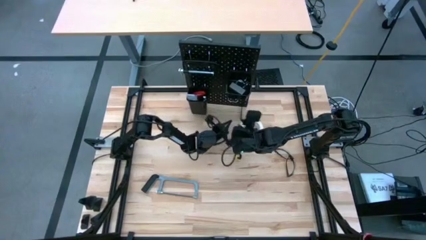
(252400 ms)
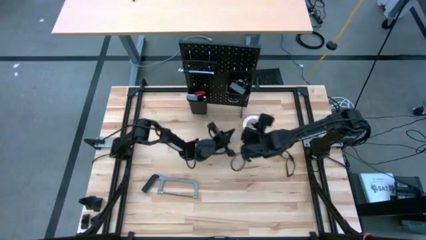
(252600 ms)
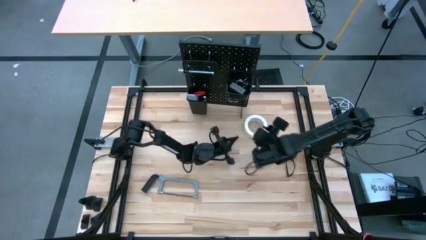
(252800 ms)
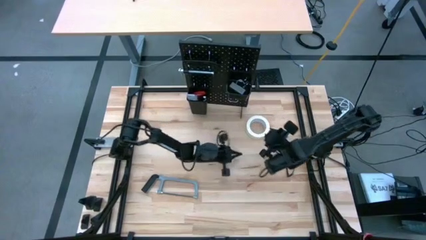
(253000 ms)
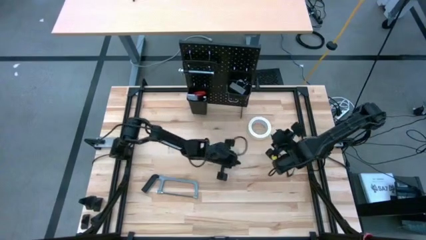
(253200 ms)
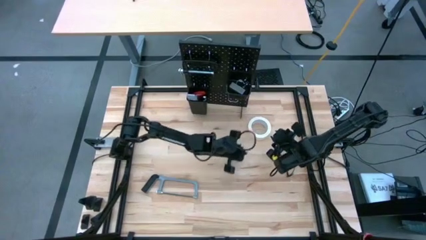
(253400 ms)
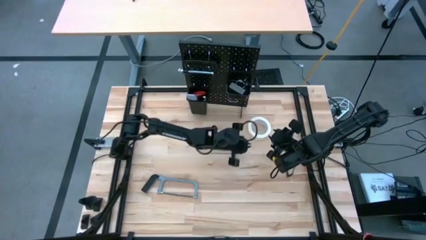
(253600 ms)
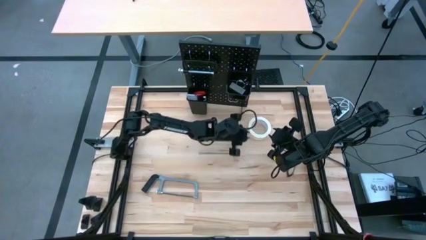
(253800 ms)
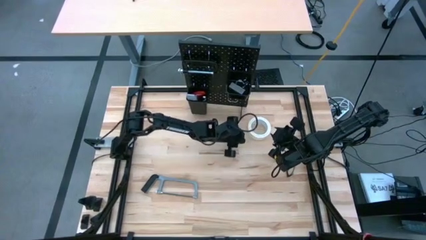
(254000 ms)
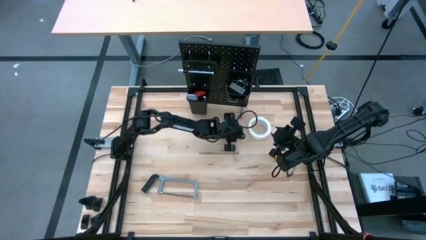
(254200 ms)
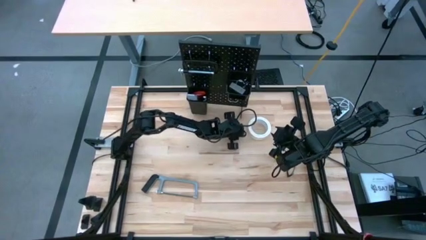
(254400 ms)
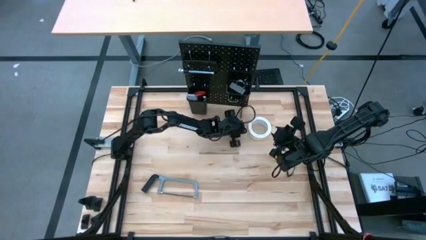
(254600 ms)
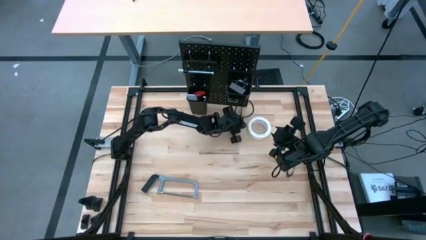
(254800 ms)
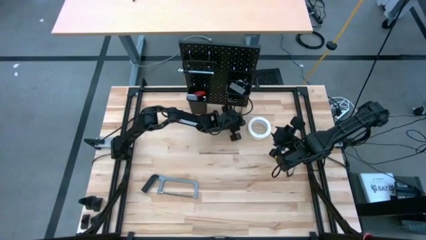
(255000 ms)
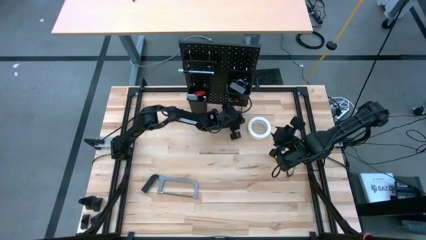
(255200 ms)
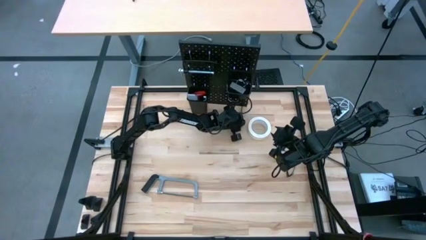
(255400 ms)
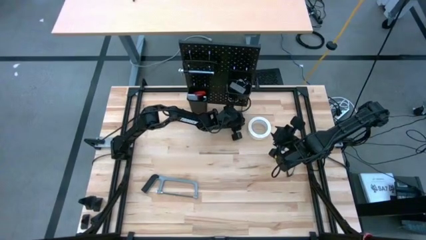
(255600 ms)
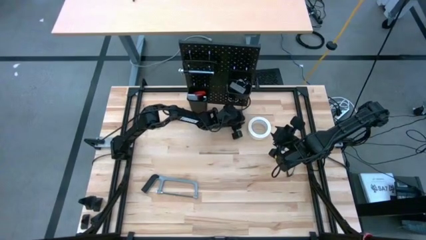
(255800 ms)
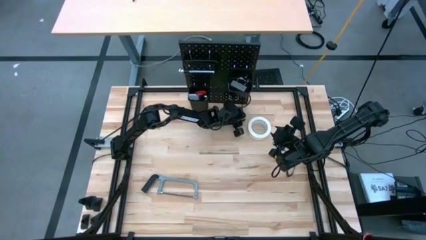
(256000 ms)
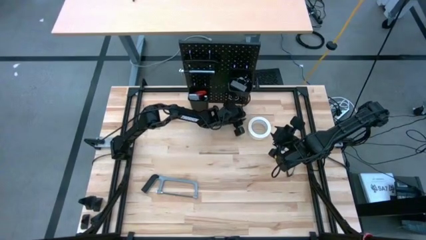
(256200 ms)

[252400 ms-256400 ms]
Task: Hang tools onto peg board
Adjust the black peg board

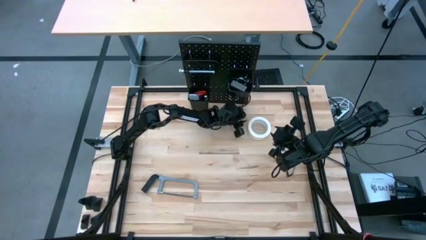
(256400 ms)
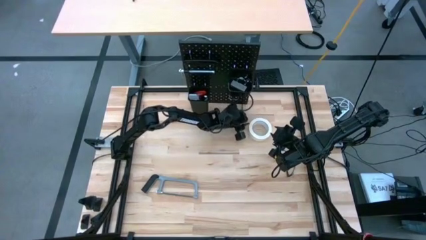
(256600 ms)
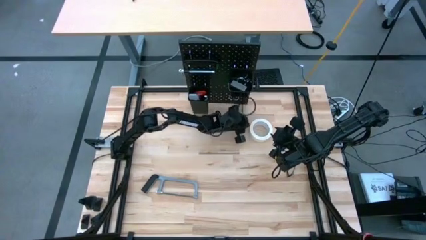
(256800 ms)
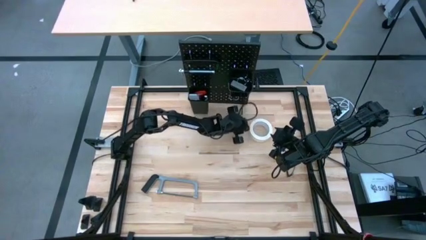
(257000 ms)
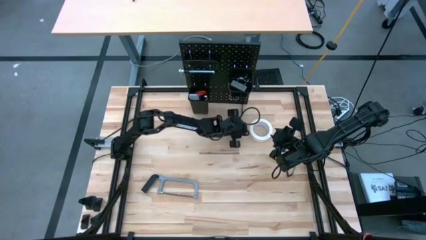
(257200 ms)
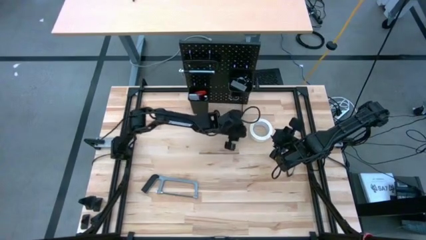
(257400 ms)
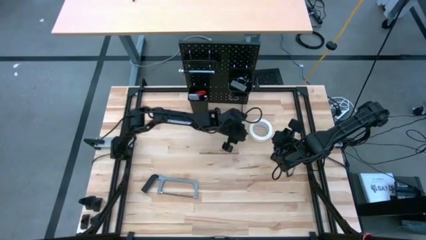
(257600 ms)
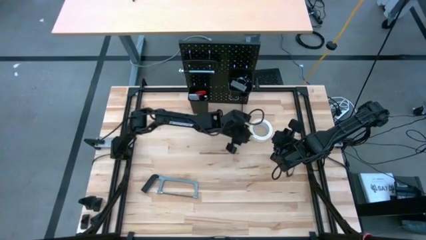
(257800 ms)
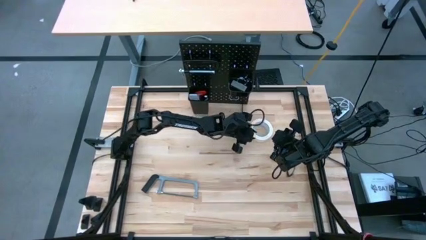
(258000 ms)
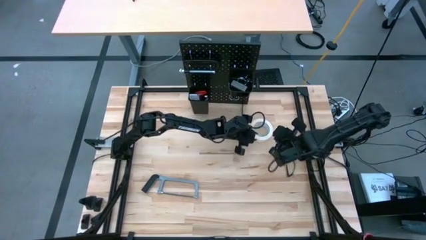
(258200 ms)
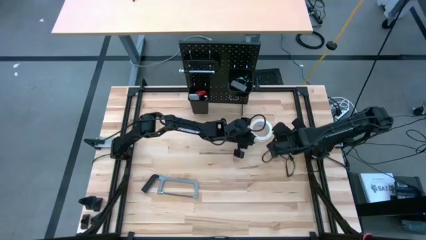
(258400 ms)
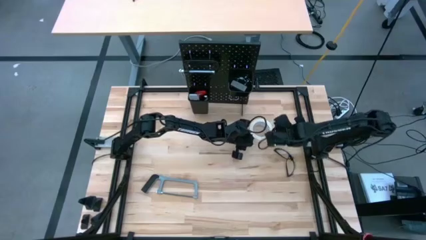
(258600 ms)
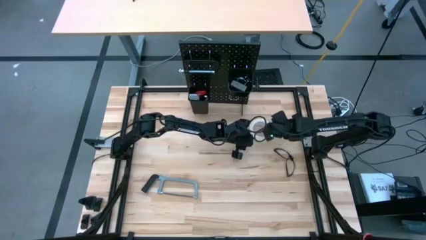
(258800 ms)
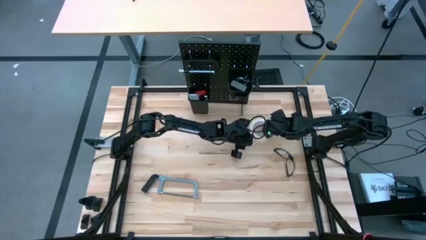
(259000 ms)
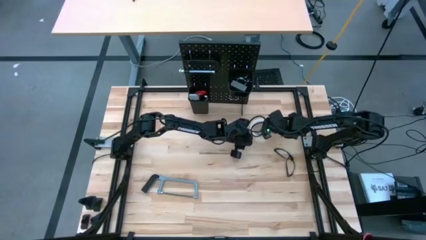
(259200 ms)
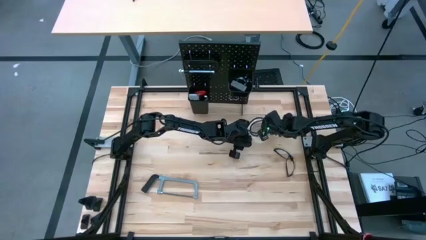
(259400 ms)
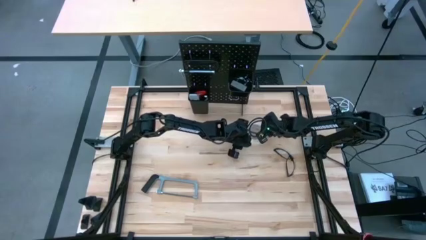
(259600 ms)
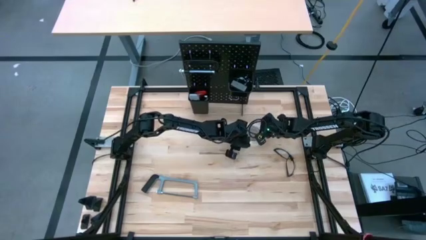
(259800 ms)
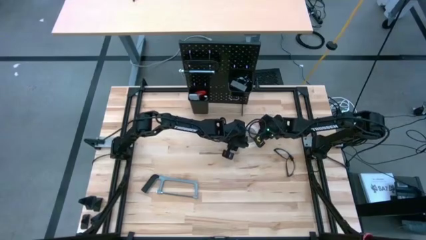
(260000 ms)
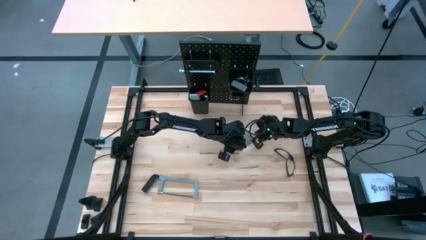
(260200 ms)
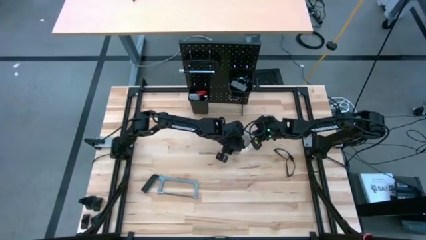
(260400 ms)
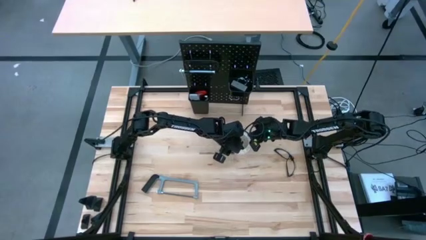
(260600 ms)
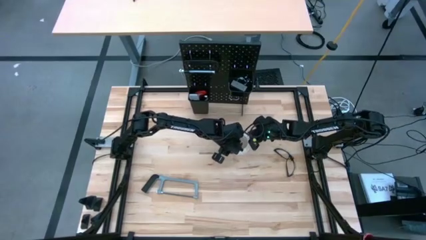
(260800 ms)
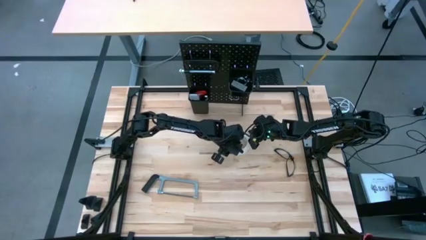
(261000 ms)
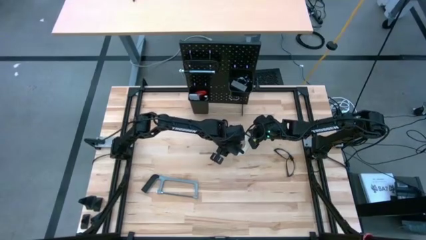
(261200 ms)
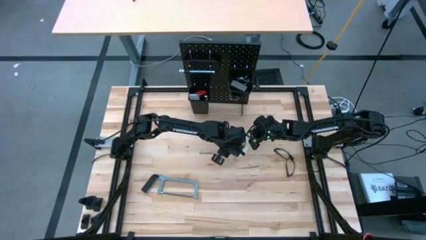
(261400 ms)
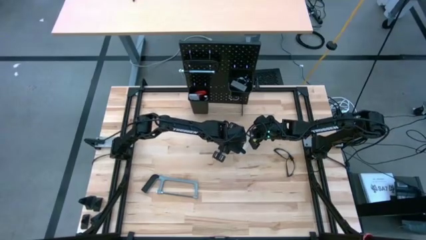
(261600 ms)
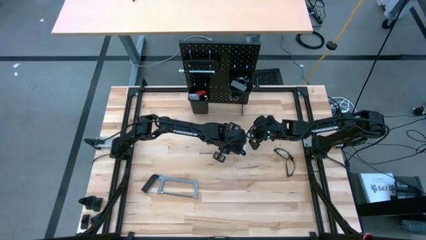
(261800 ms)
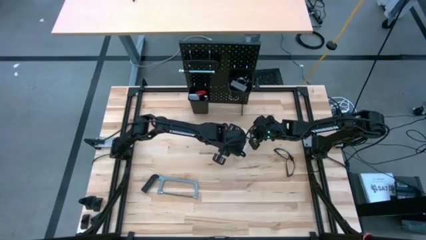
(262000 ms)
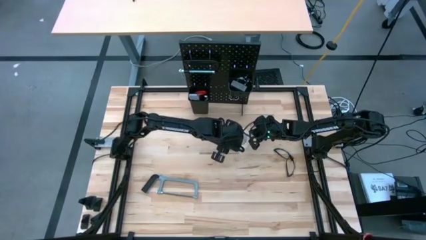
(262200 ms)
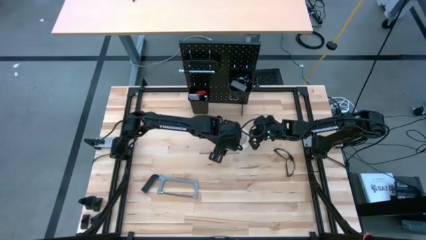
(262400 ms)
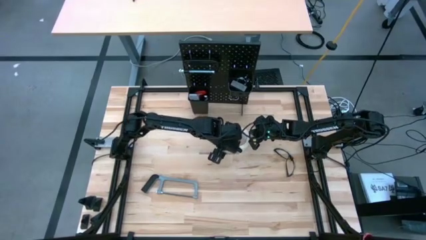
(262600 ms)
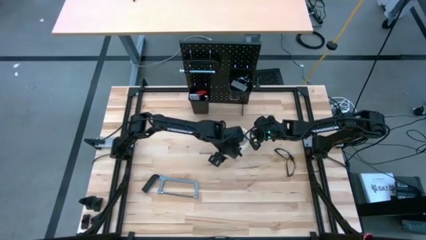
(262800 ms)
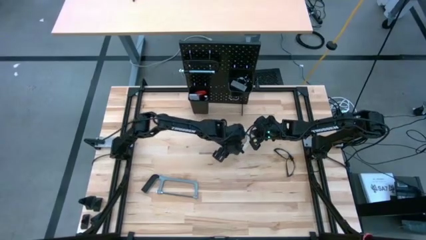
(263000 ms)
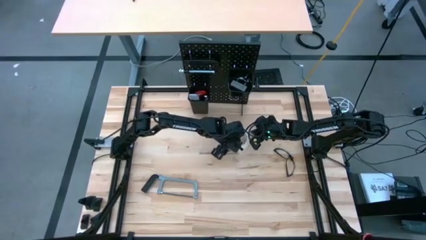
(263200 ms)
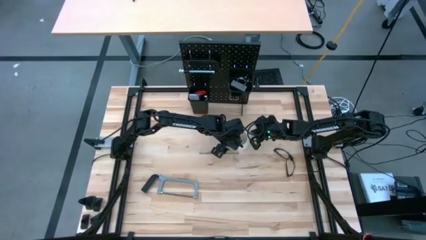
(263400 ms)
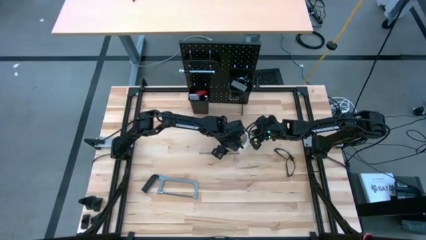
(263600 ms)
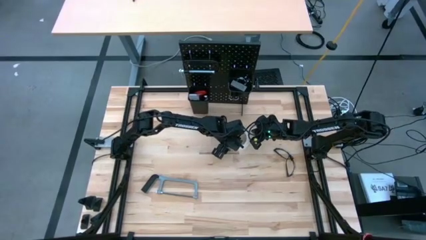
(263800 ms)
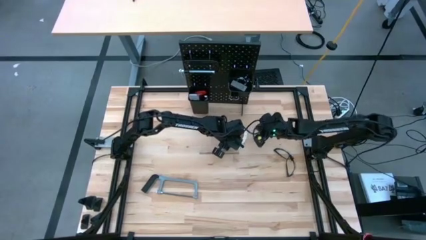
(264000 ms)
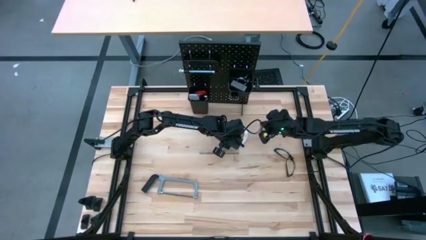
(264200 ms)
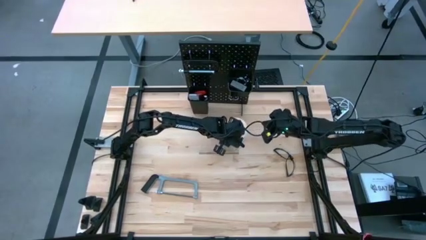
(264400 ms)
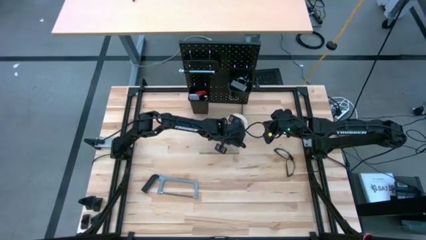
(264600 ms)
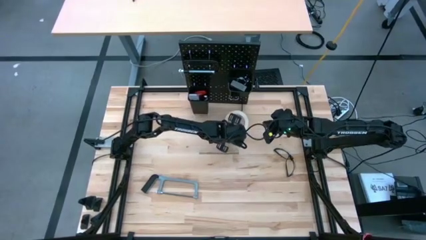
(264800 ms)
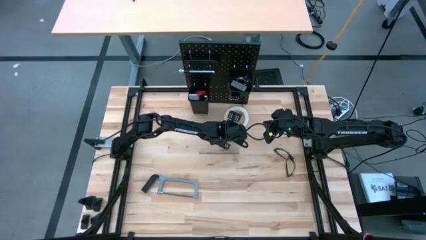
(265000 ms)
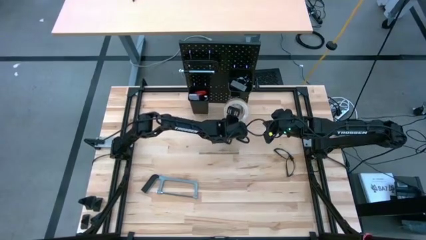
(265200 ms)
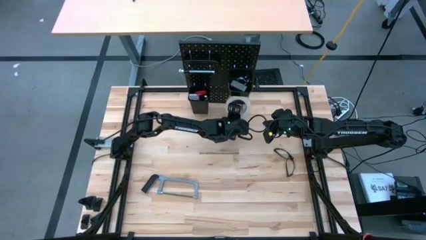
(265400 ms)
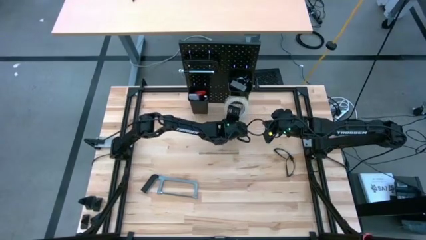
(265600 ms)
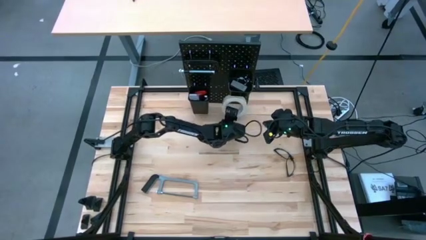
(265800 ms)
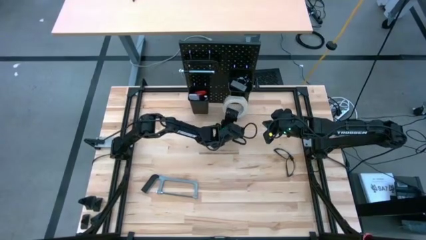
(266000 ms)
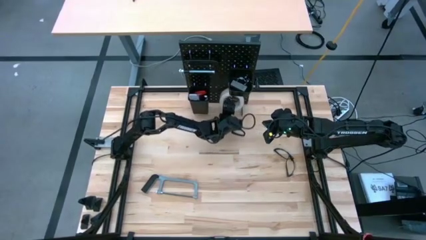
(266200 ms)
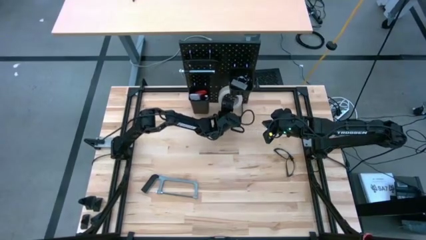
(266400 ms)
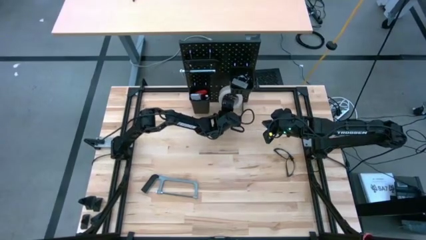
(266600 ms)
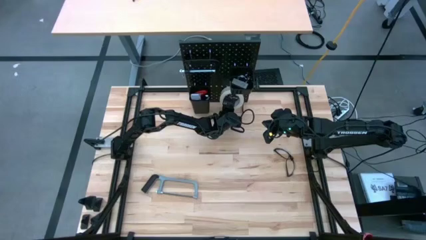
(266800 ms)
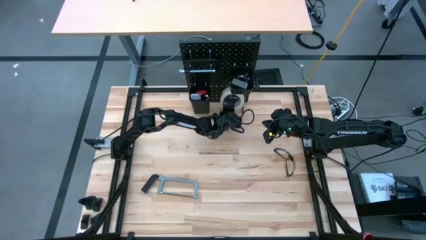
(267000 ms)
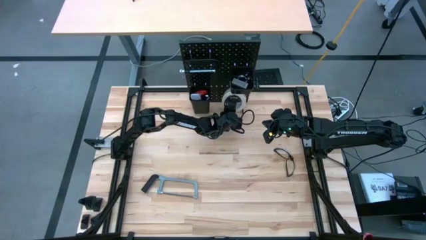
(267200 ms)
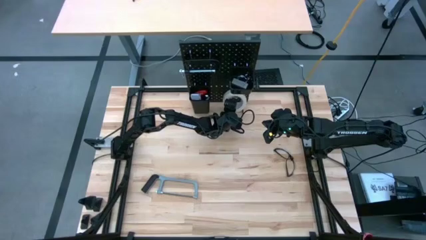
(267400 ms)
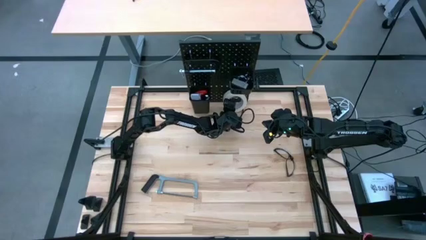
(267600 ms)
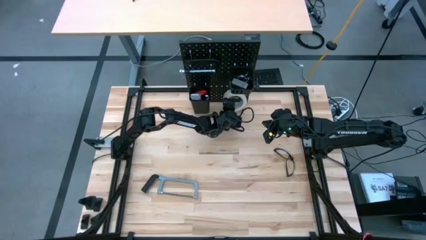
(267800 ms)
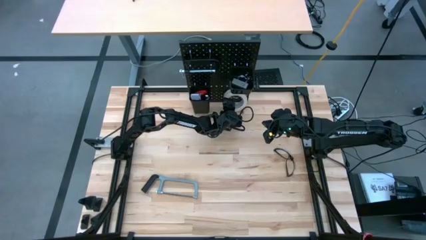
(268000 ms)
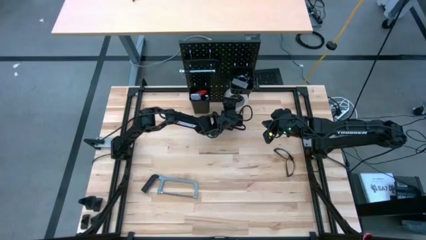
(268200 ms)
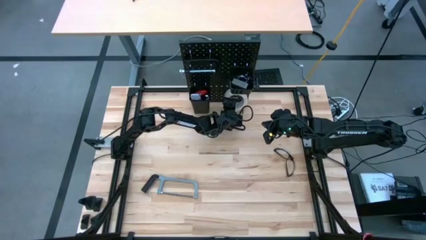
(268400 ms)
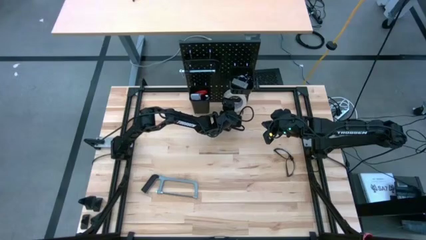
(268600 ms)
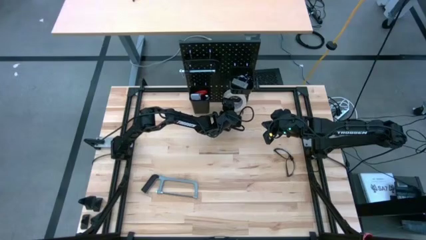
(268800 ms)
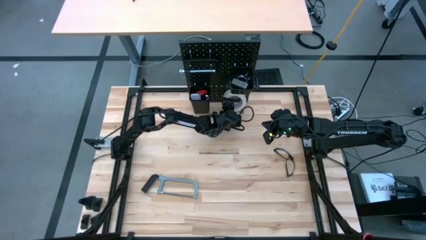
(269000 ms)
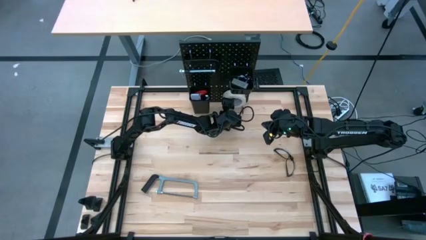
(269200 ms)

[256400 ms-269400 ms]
Hang the white tape on the black peg board

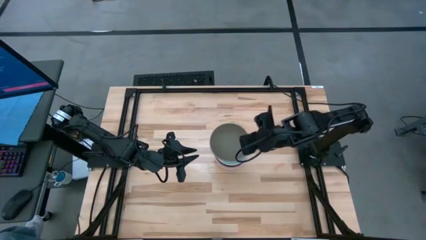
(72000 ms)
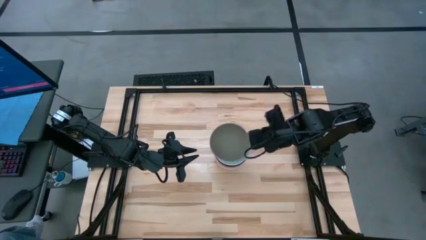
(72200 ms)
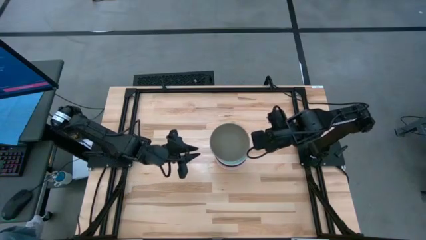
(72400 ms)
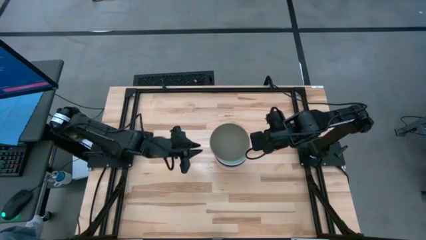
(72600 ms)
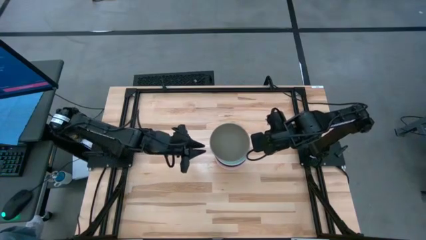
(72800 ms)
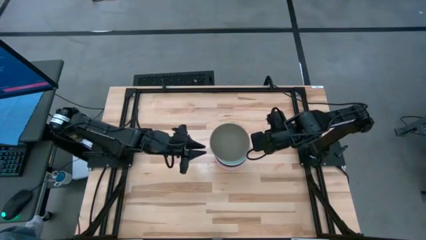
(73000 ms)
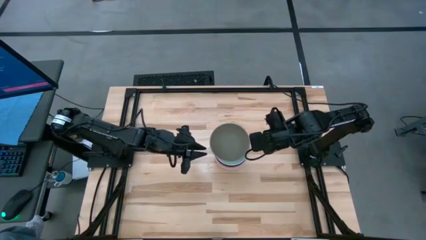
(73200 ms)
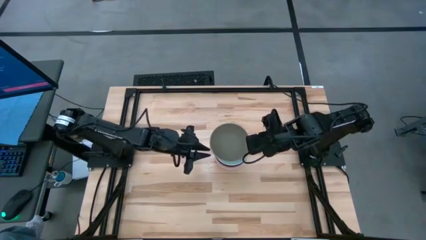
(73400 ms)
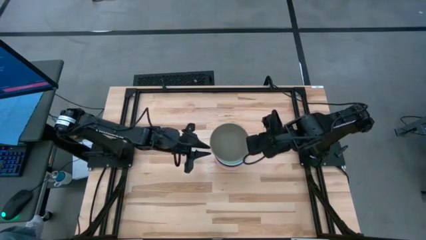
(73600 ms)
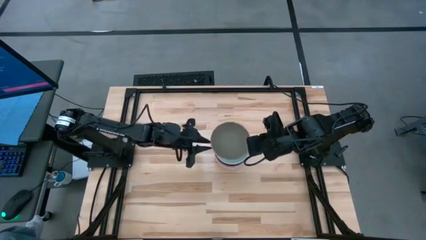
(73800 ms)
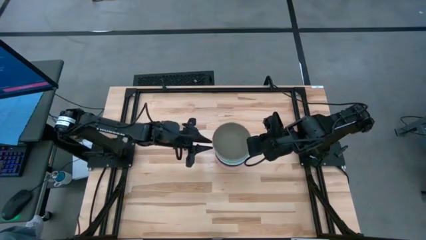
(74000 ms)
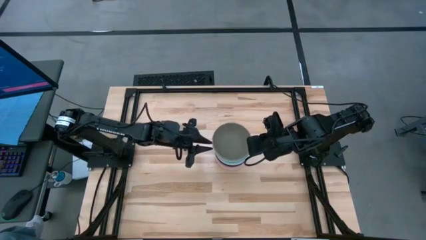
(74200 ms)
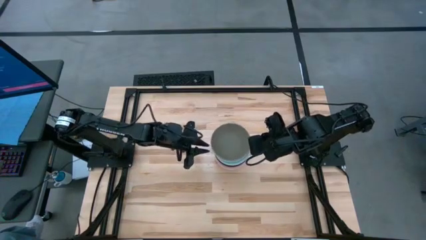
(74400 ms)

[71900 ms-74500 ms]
Task: Nest bowls inside each other
Adjust the stacked bowls
